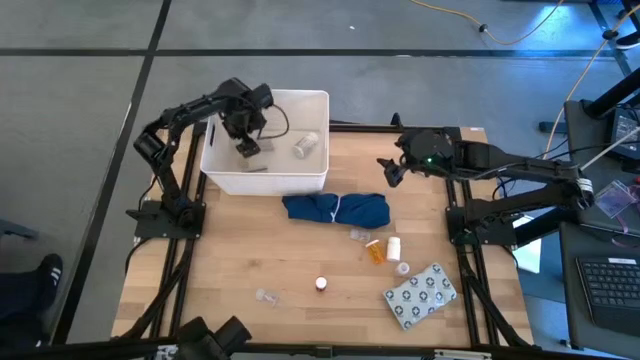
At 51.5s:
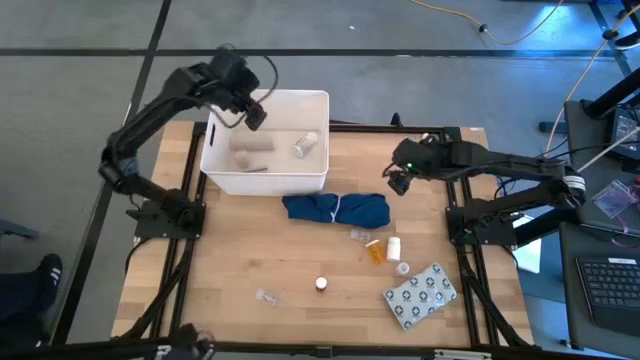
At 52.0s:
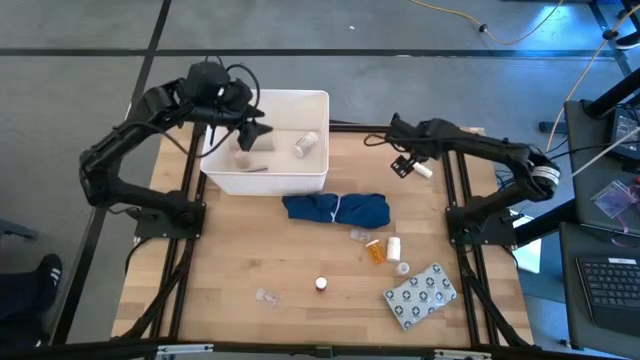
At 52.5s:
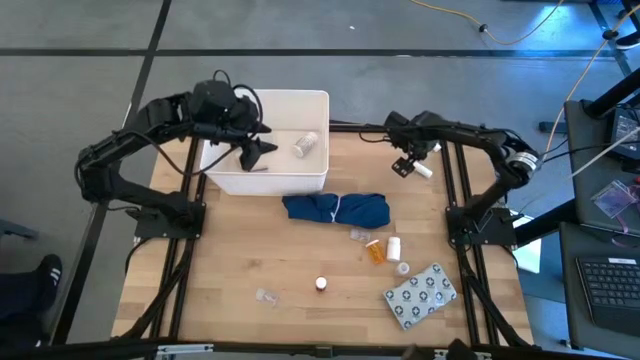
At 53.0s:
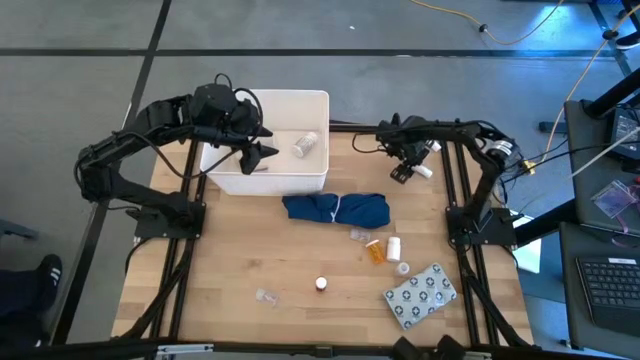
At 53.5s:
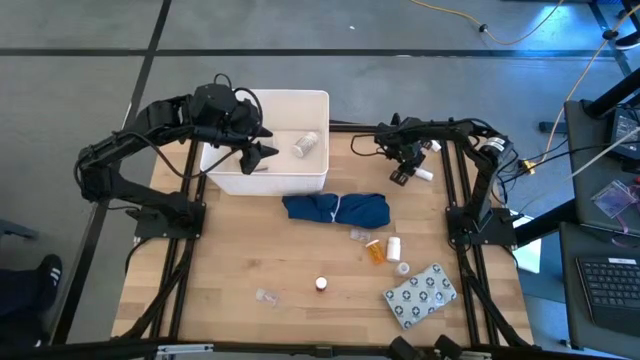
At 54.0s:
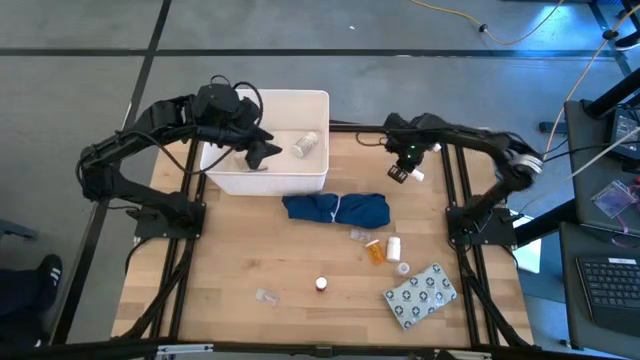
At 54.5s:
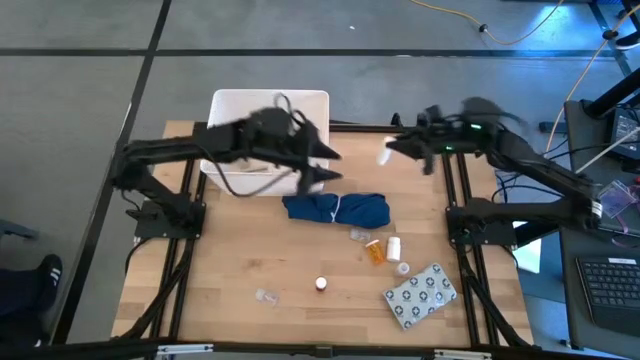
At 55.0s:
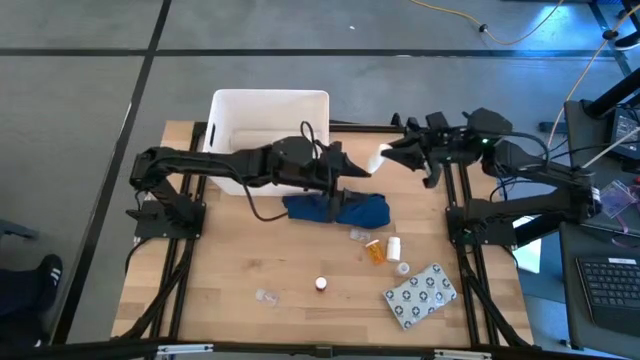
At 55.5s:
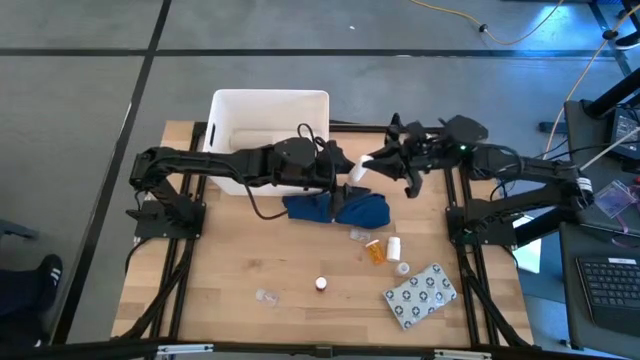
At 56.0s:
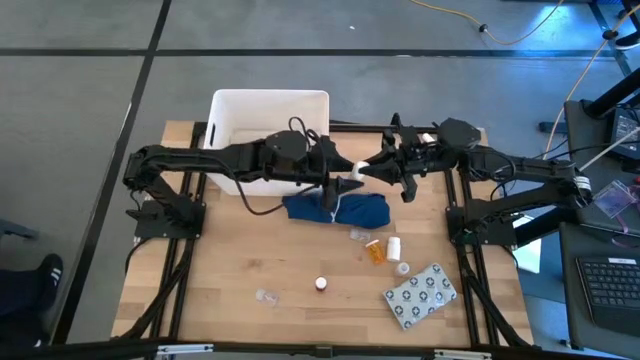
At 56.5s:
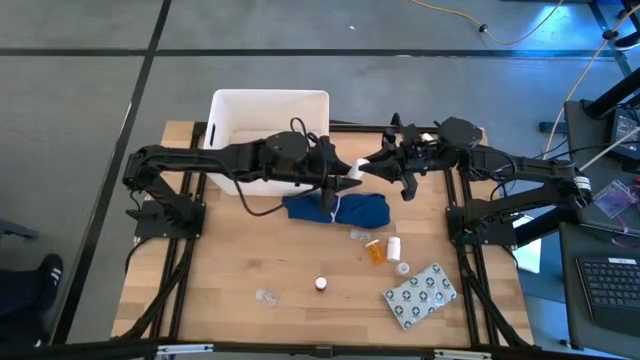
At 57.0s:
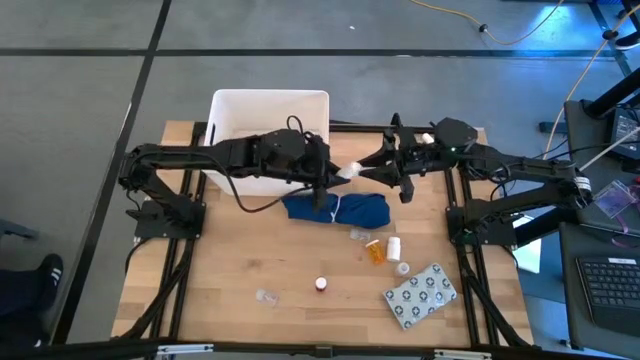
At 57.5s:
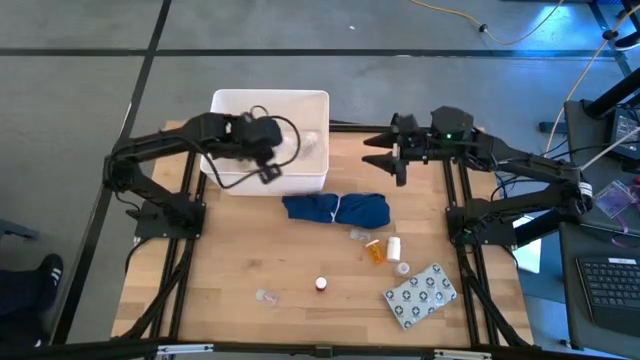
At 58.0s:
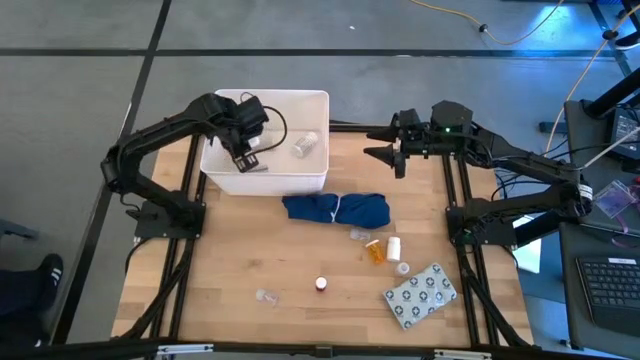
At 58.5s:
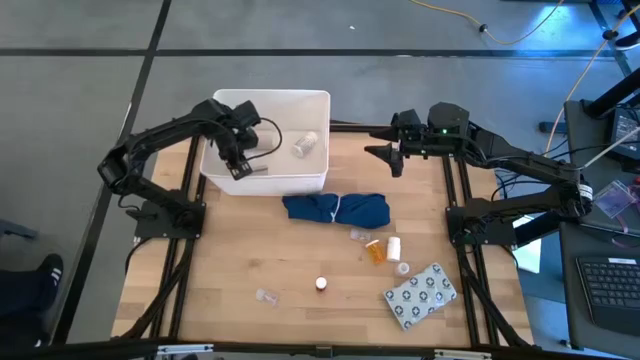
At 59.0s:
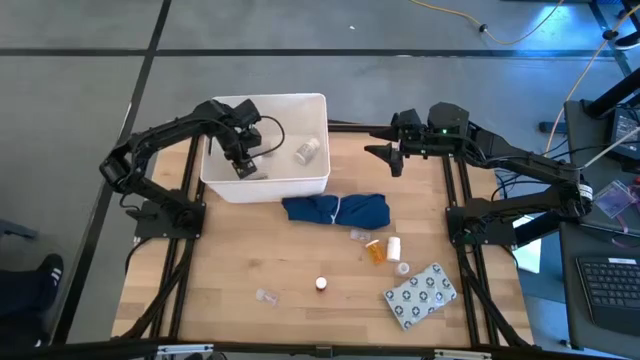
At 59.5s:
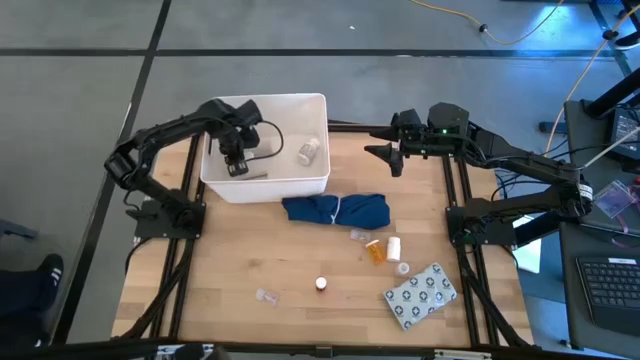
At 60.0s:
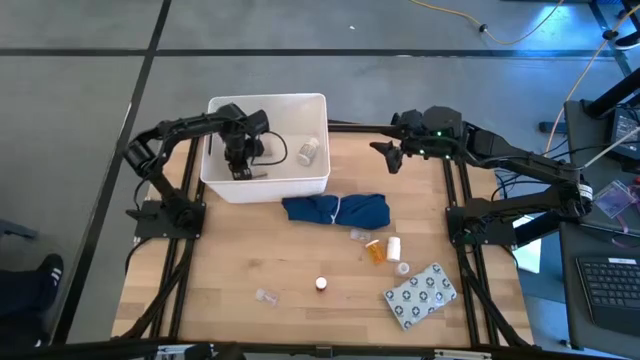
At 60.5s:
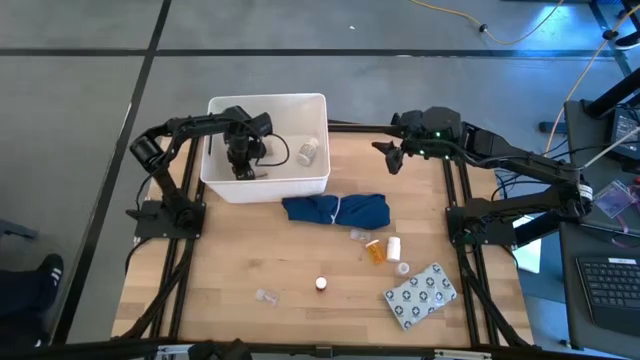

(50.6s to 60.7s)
Task: Pick & place medical supplies in basket/bin
Put the bottom white rolled gauze into the white container

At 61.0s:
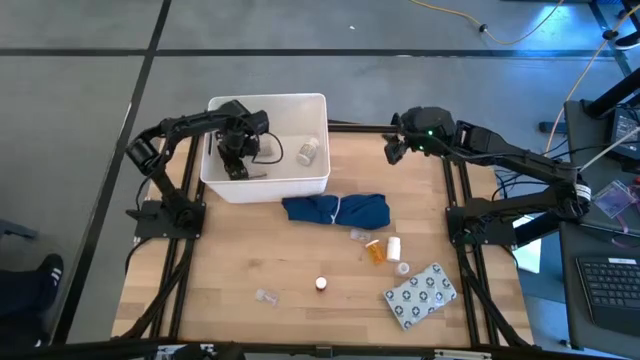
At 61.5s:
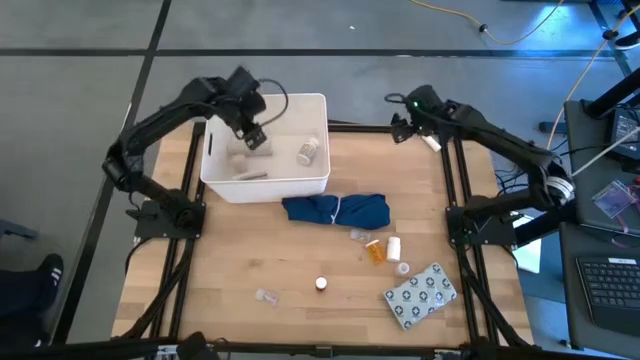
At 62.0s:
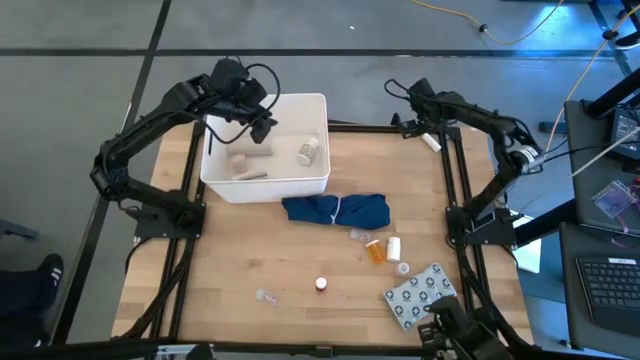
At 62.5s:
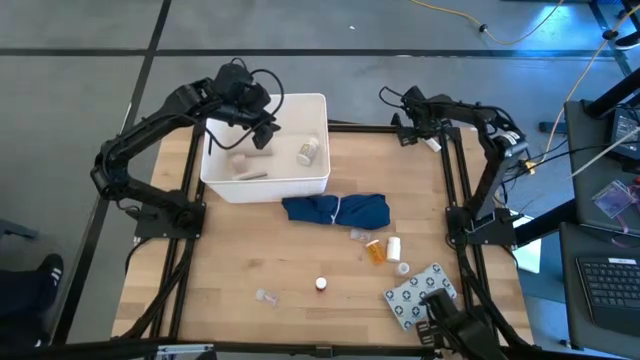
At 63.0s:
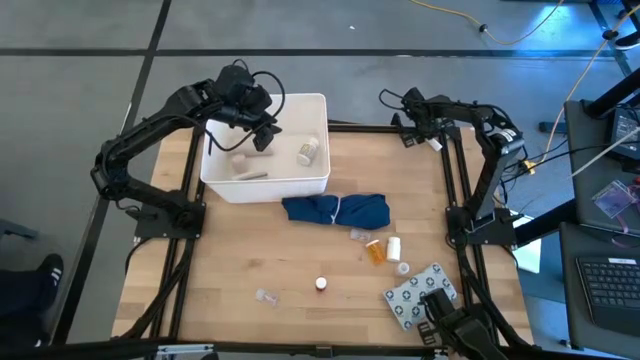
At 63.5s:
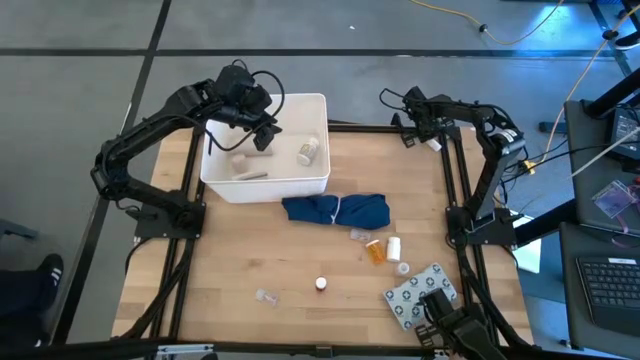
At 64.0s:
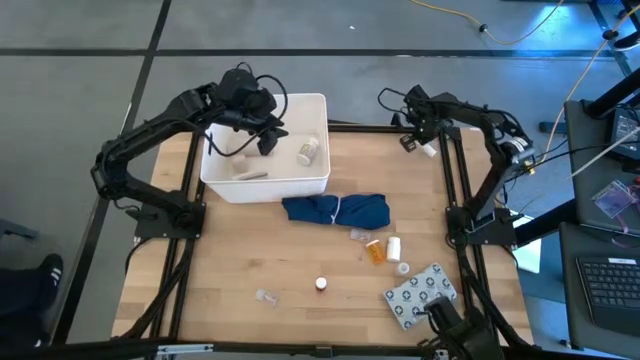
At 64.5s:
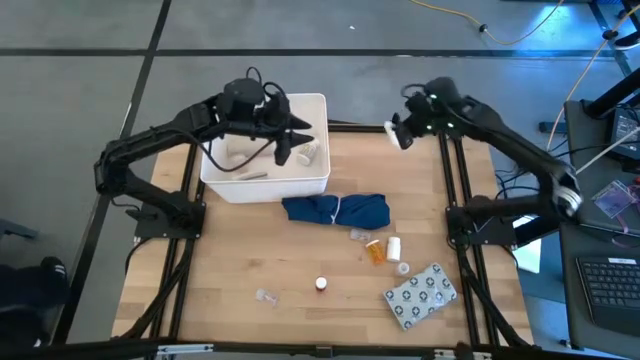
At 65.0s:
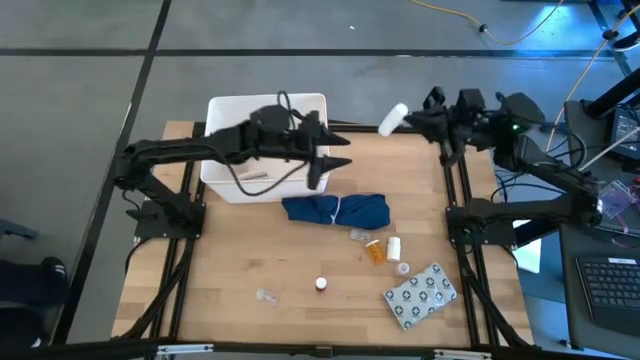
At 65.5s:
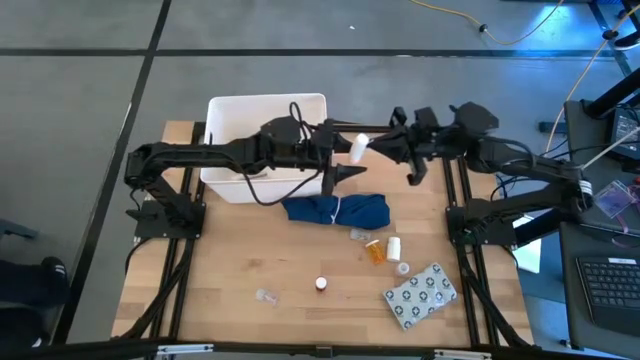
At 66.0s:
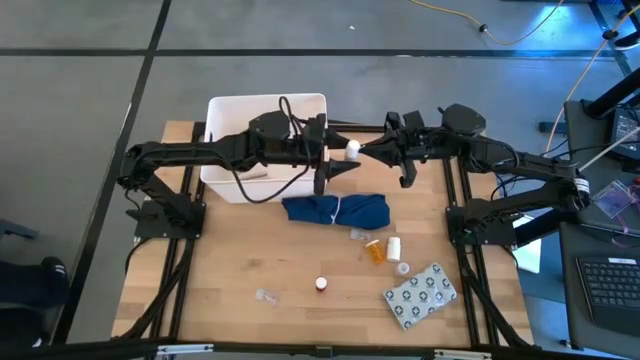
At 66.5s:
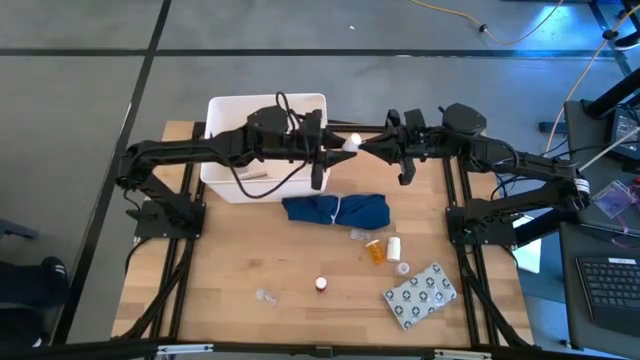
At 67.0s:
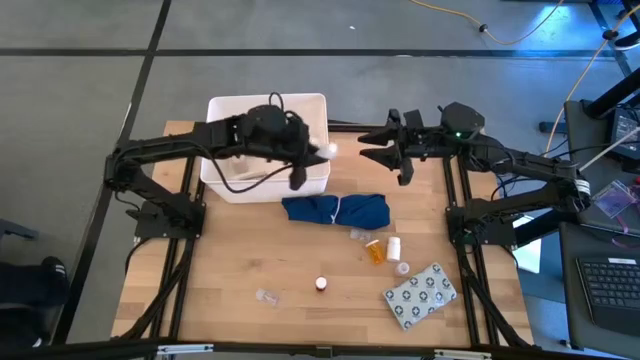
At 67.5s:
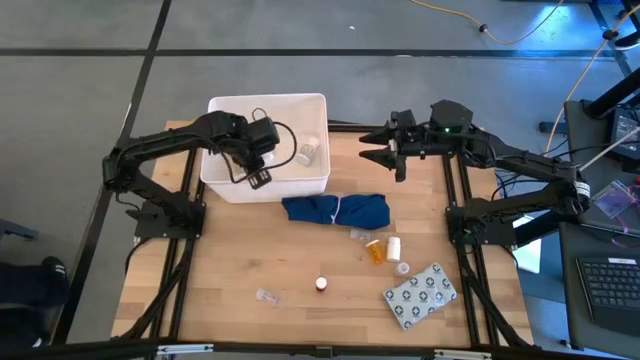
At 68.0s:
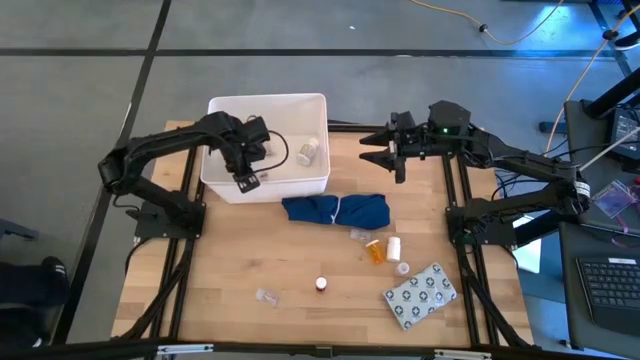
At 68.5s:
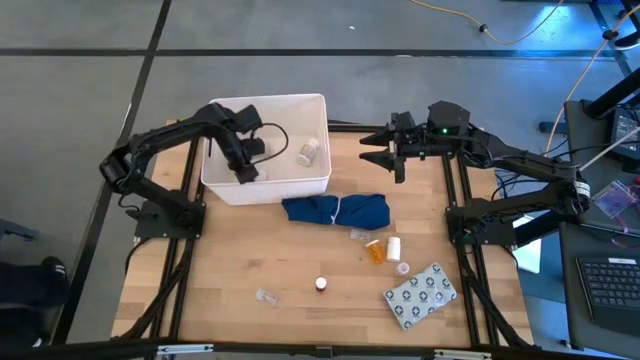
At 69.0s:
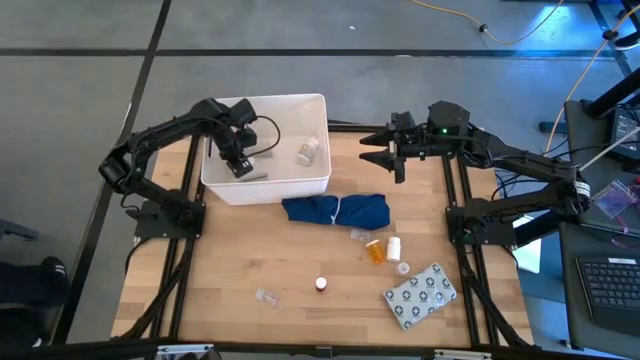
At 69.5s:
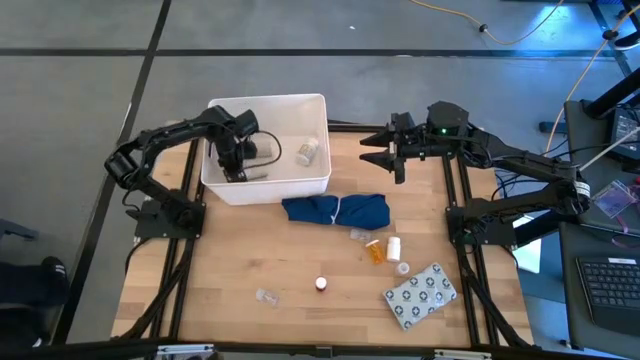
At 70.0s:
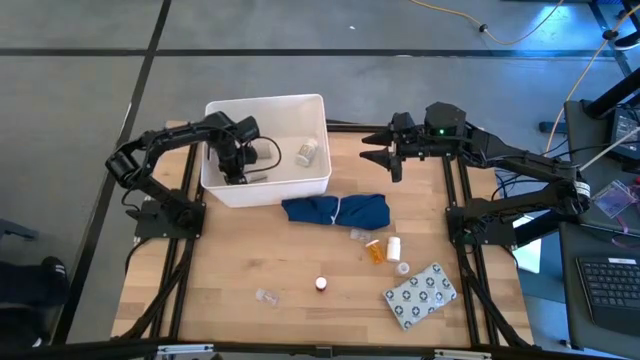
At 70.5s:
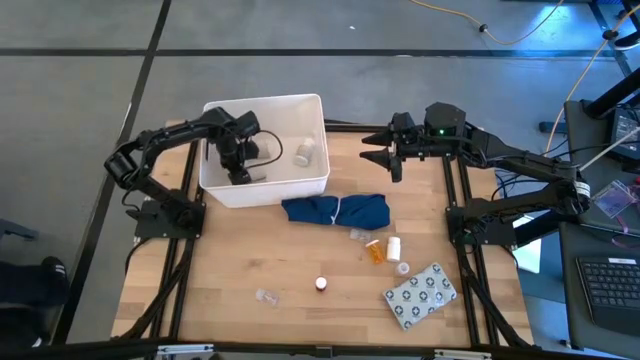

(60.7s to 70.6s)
Put the white rolled gauze into the white container
